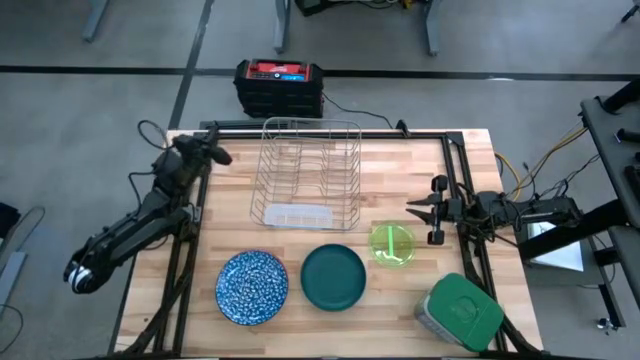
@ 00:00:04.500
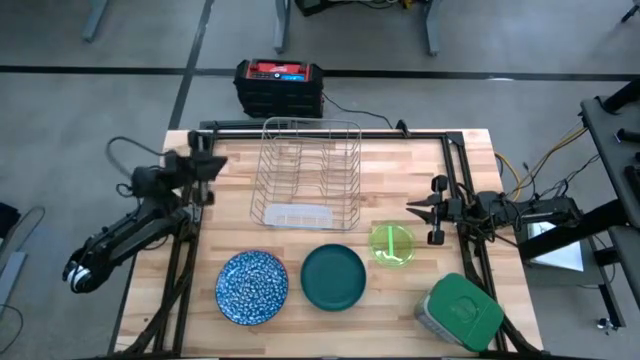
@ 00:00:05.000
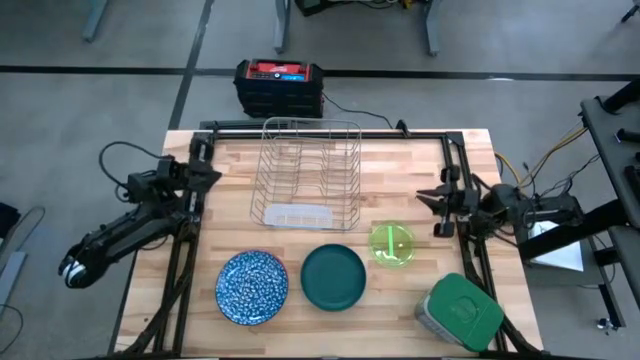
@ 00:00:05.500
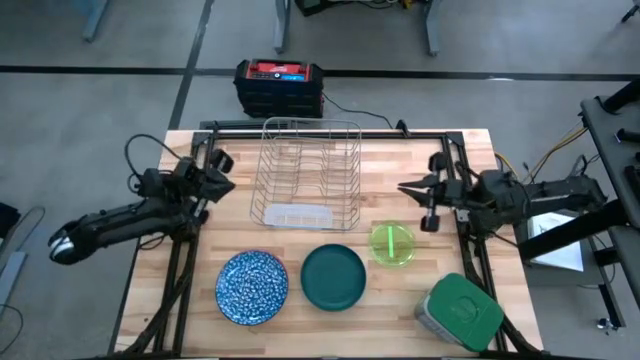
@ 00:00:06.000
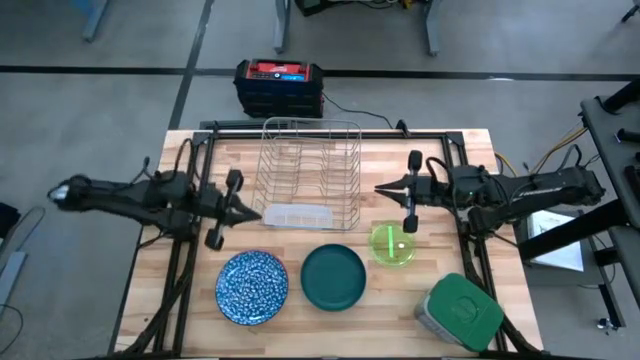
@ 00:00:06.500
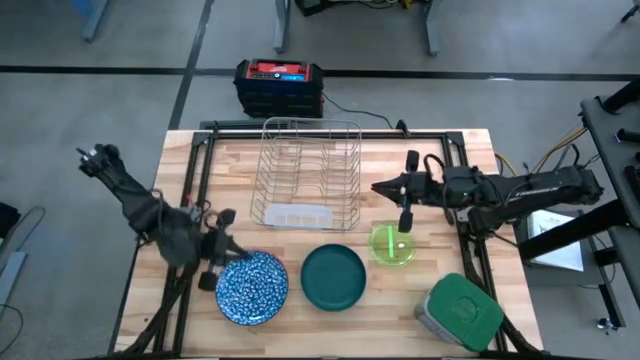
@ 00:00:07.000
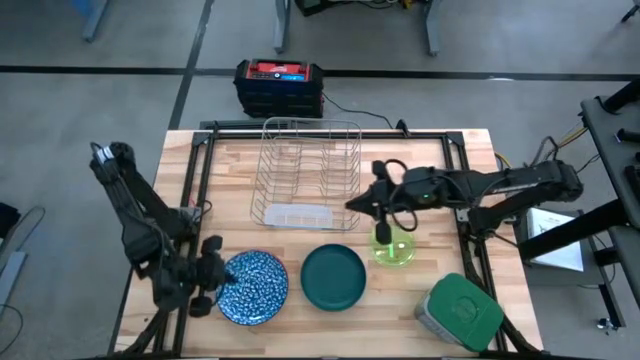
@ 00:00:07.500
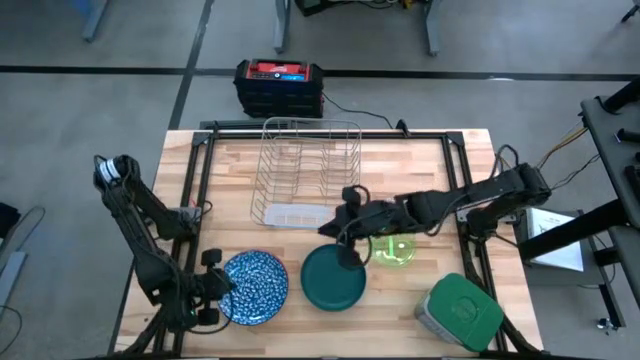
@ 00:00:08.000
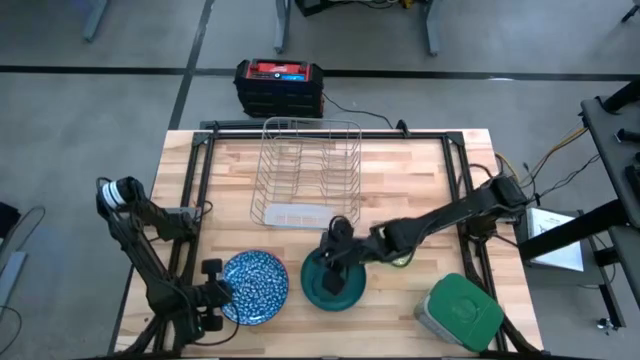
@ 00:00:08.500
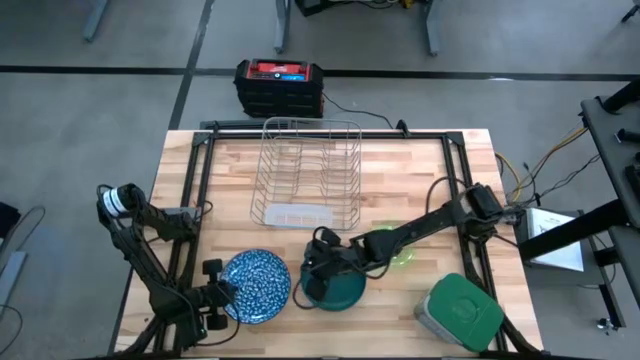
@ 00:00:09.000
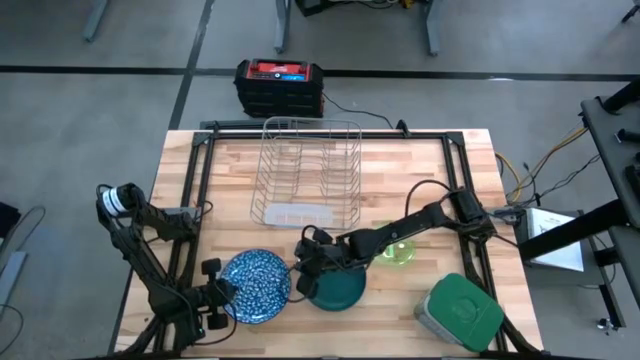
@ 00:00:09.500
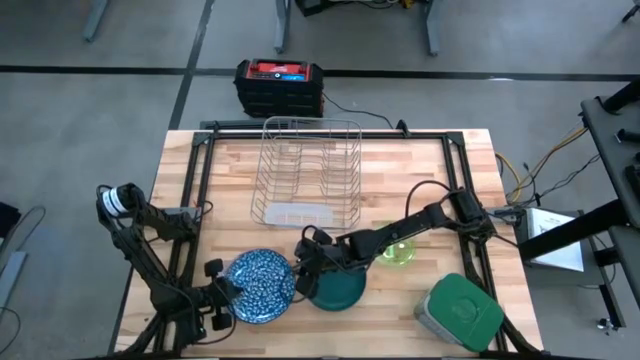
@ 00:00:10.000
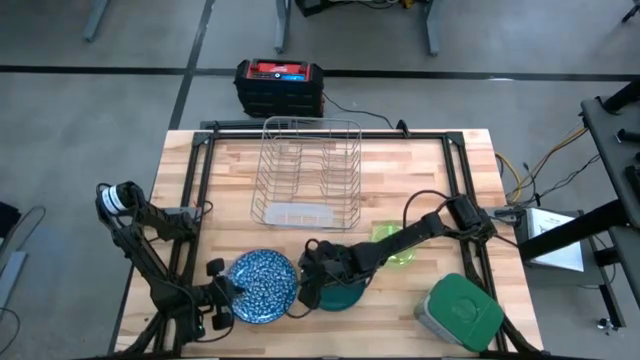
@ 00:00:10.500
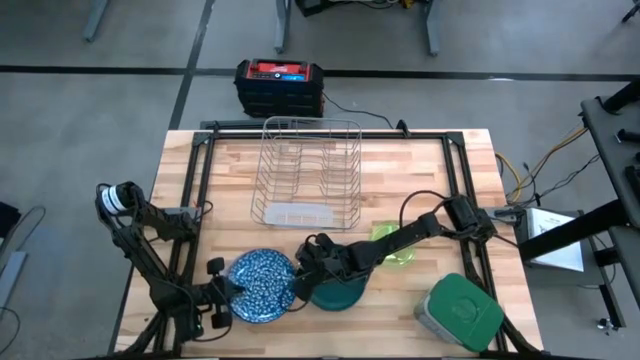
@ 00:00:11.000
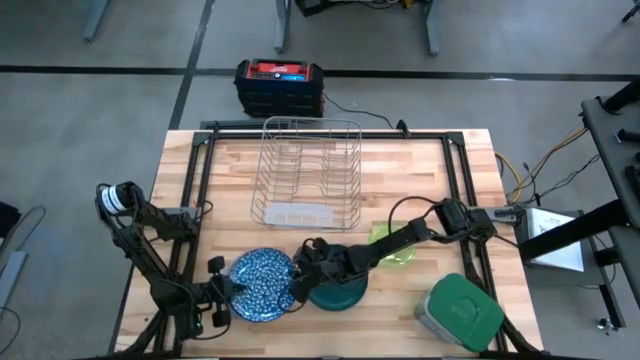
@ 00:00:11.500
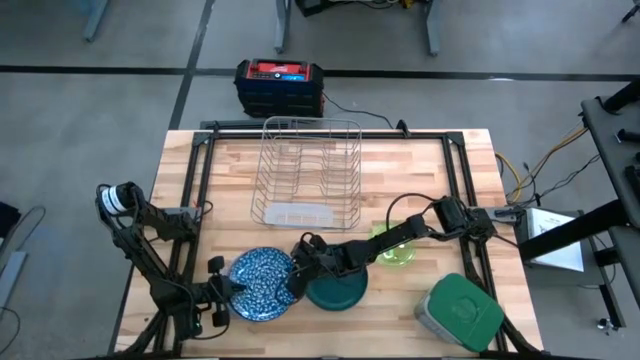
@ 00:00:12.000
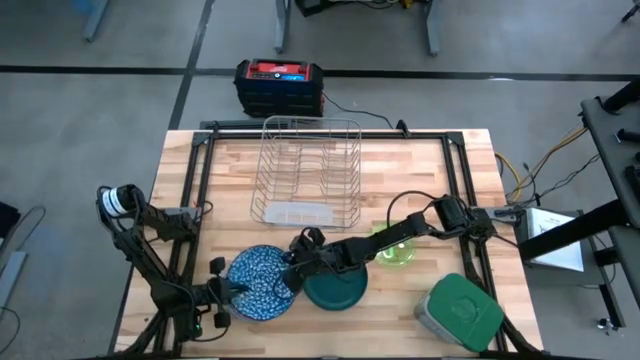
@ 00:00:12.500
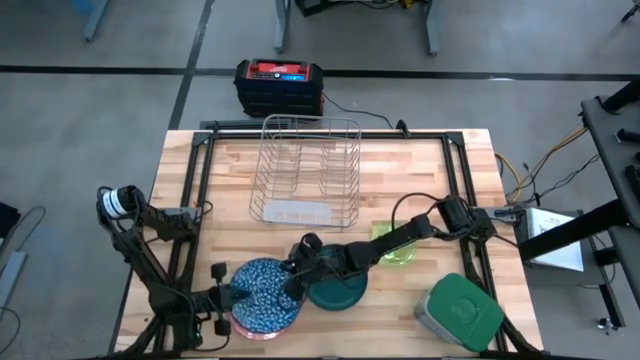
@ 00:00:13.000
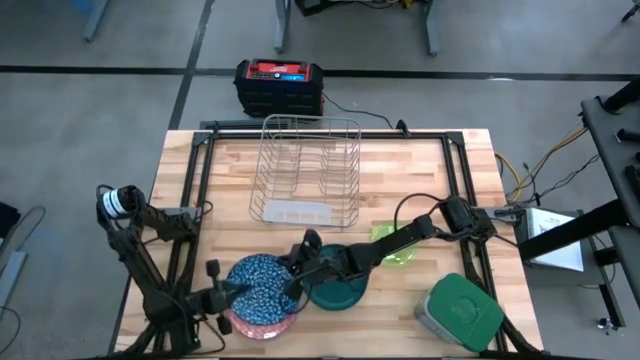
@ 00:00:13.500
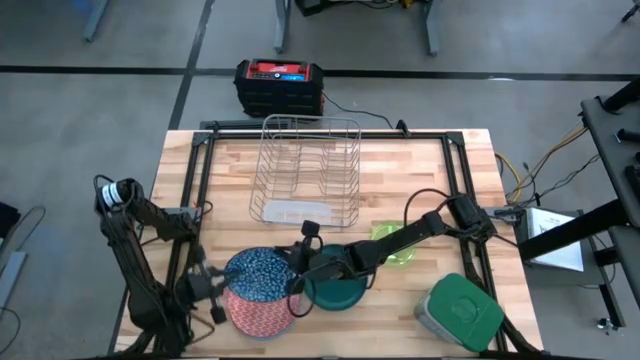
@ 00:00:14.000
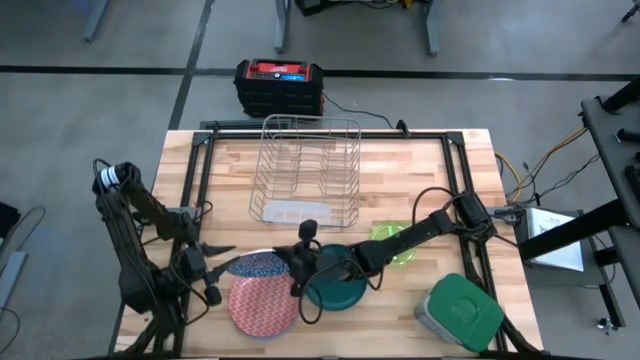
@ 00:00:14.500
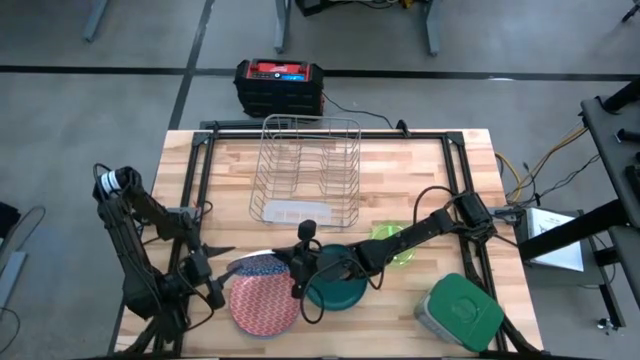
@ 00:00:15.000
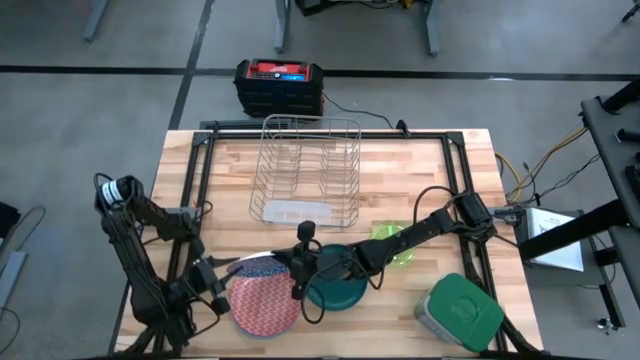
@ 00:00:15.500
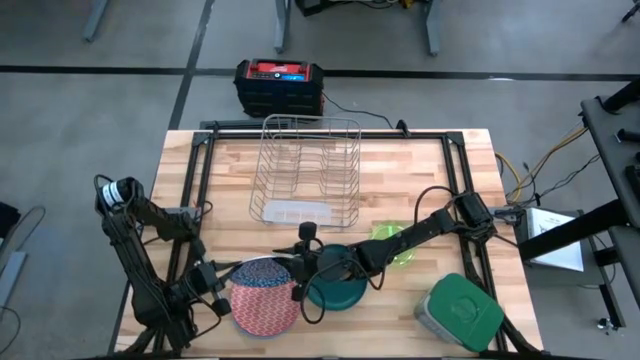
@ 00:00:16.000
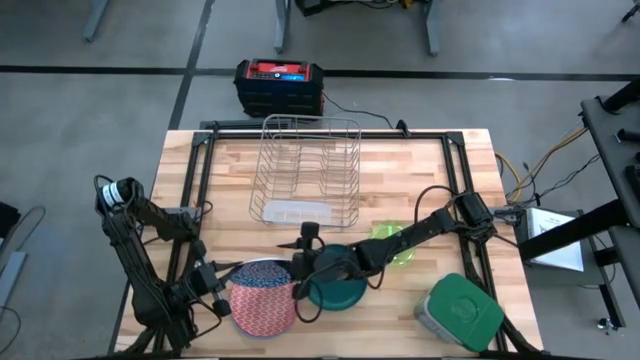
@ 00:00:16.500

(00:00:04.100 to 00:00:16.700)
Task: Sort dishes
Put the blue patterned plate into the dish rack
